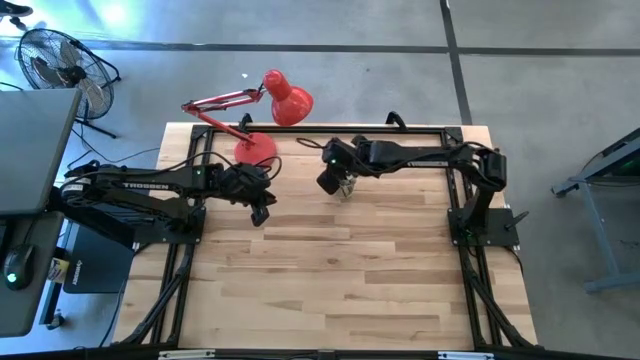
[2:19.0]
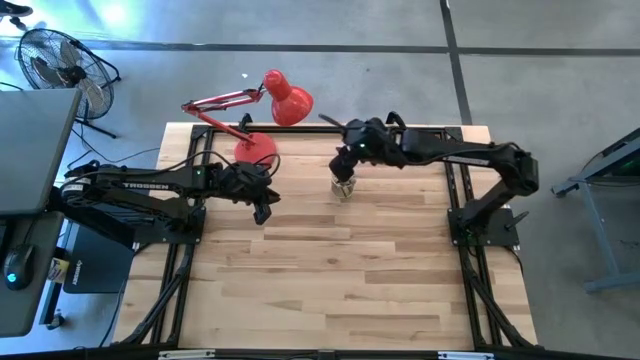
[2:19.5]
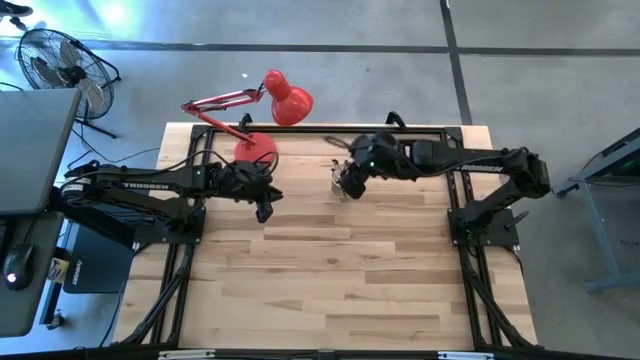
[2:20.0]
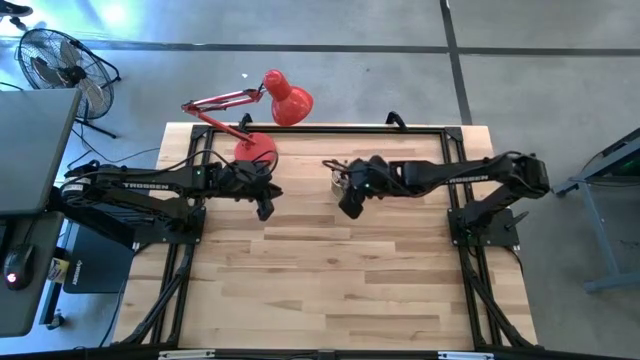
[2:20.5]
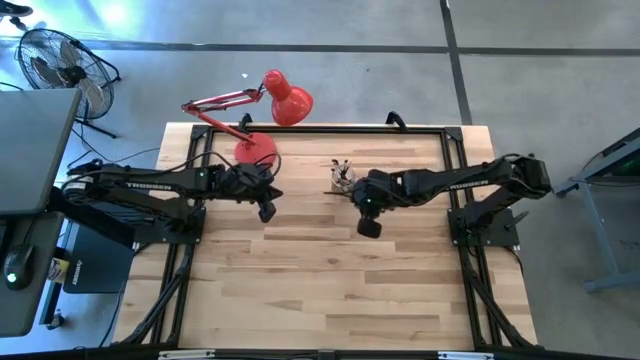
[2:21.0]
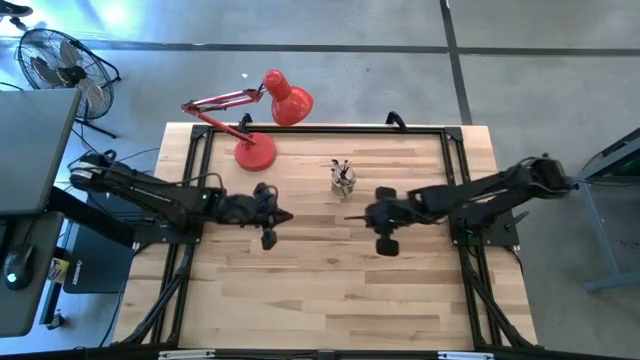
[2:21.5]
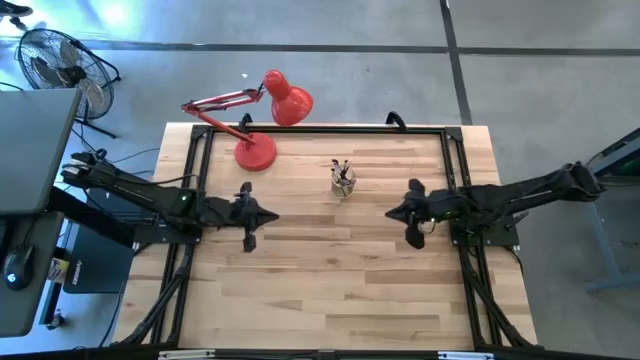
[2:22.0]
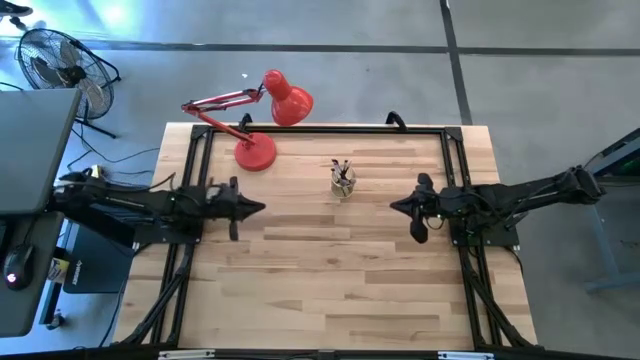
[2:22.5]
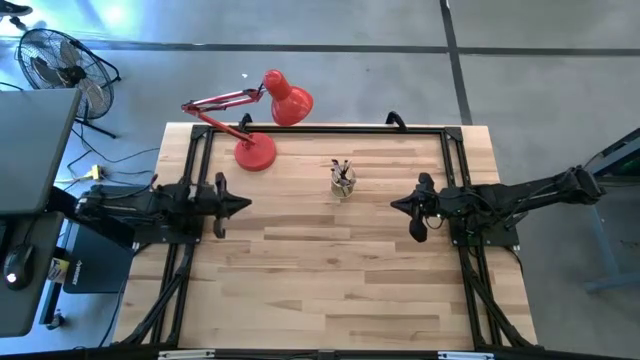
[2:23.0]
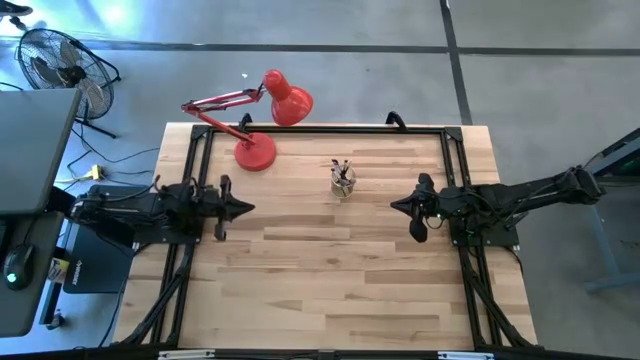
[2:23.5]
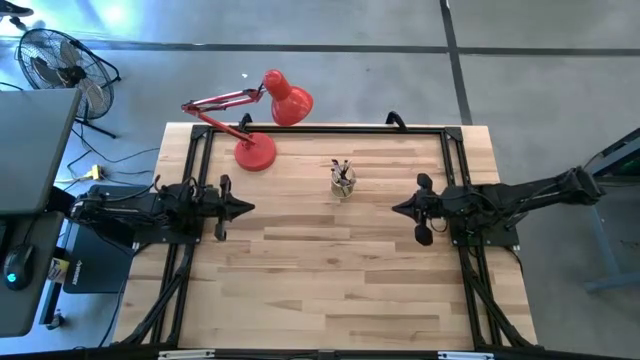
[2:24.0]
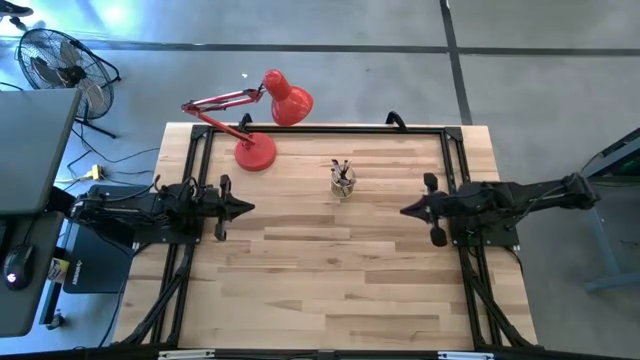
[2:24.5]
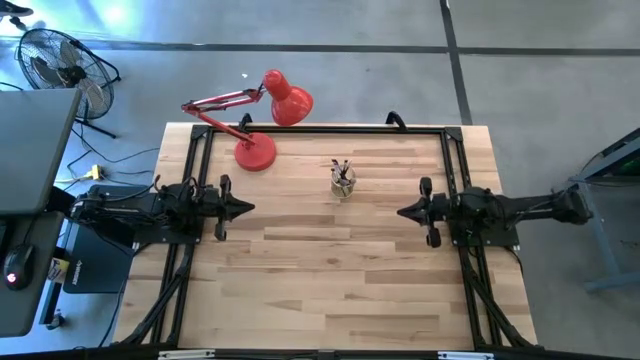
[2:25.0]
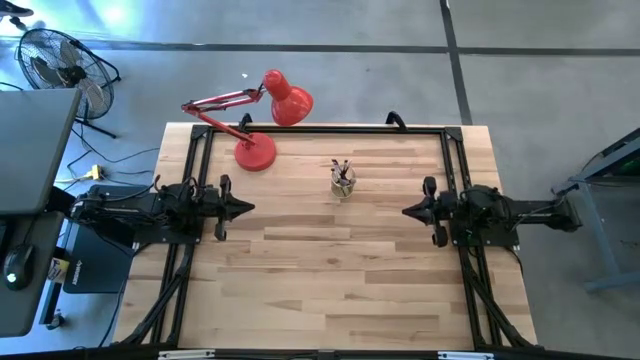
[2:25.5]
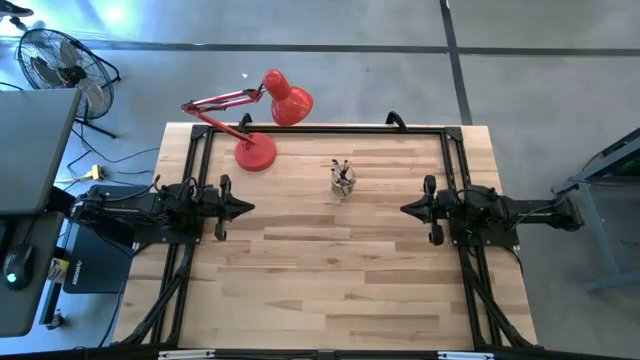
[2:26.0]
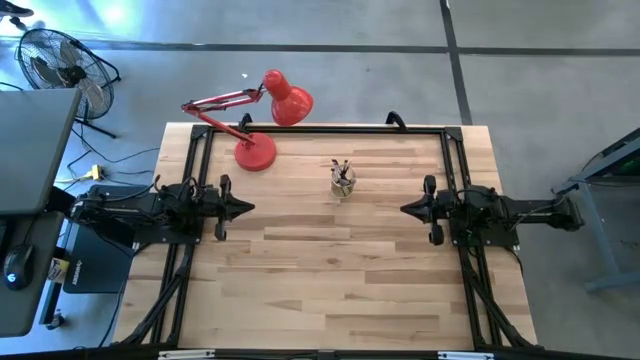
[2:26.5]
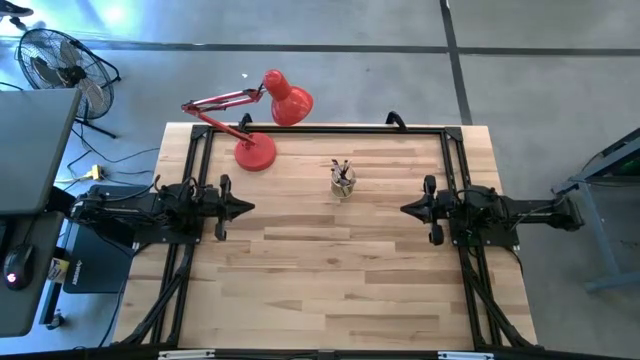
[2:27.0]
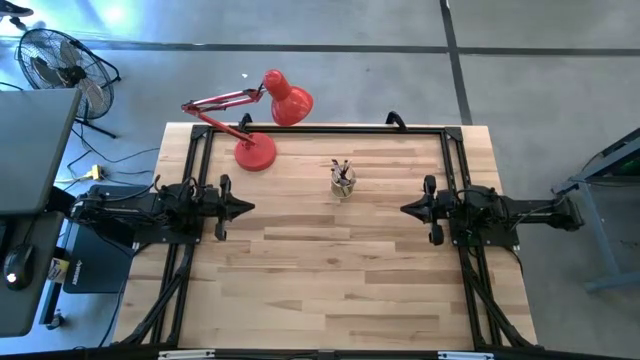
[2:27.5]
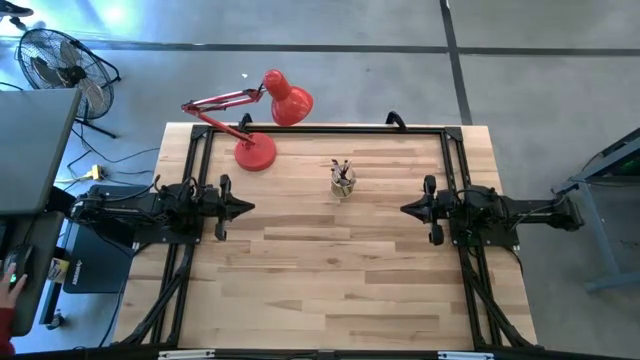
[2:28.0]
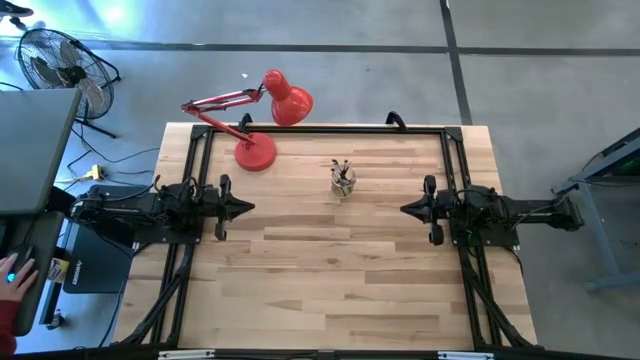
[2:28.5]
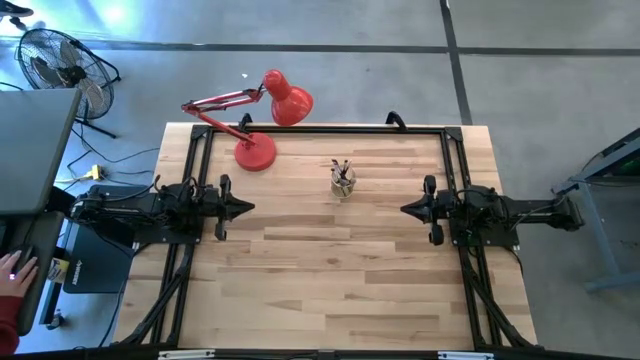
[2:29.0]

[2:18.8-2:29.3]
Task: Put items in baskets/containers
Return to Home Position

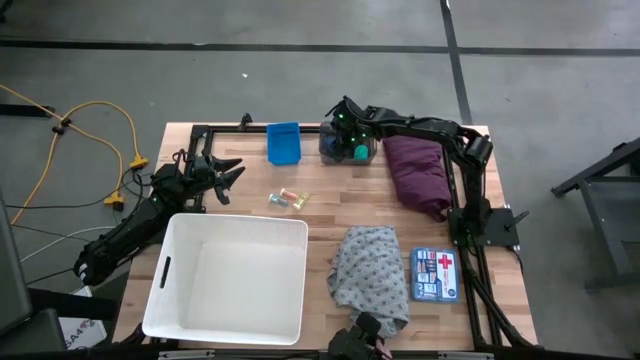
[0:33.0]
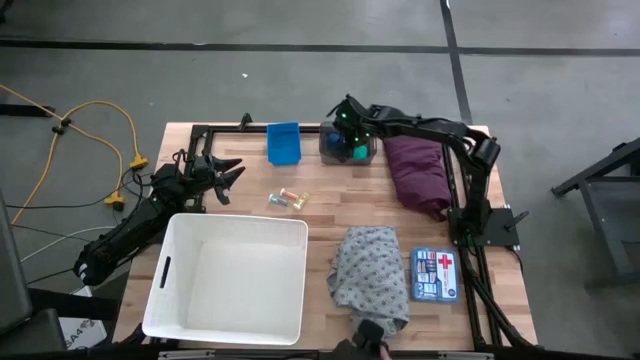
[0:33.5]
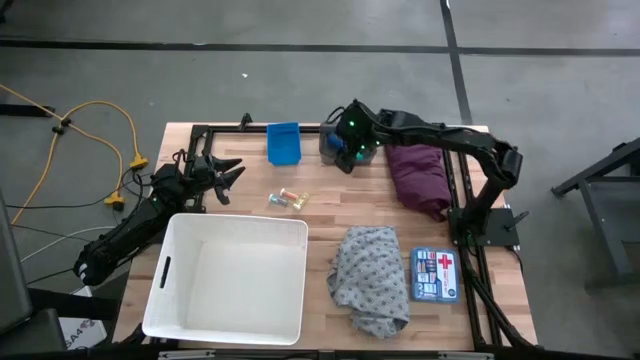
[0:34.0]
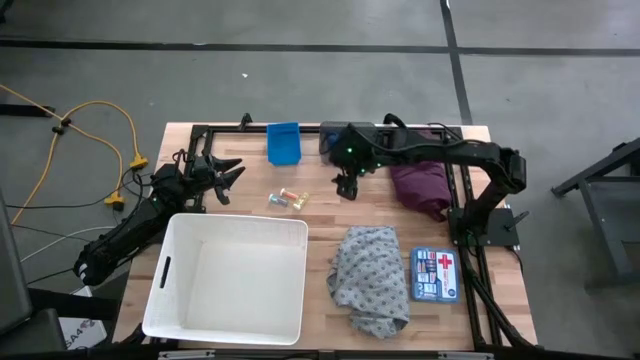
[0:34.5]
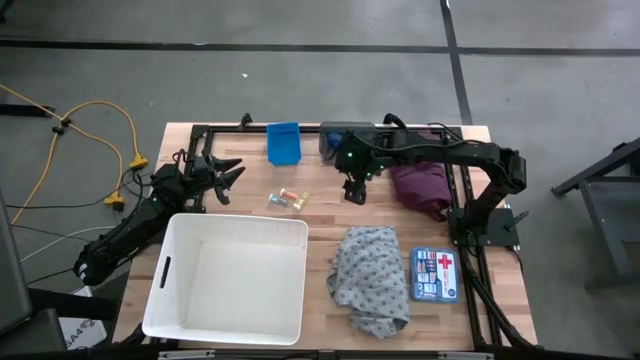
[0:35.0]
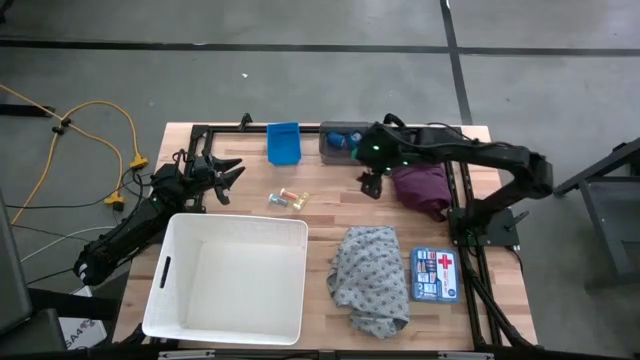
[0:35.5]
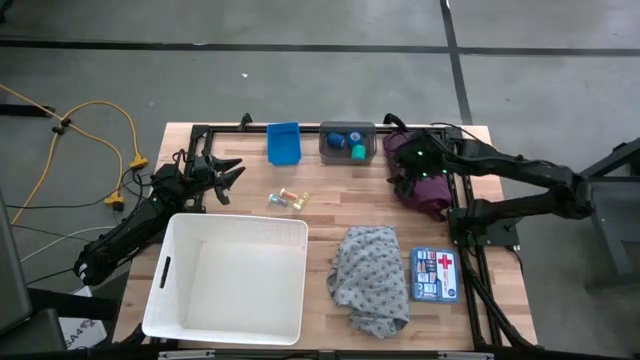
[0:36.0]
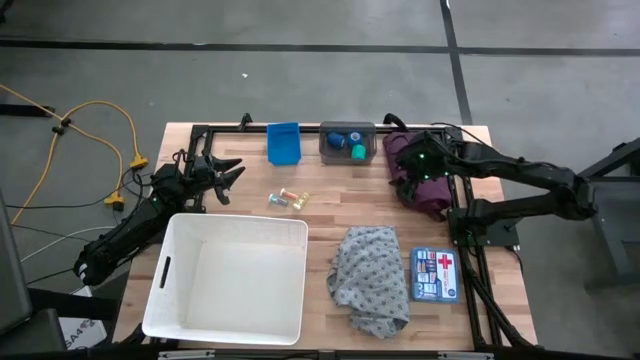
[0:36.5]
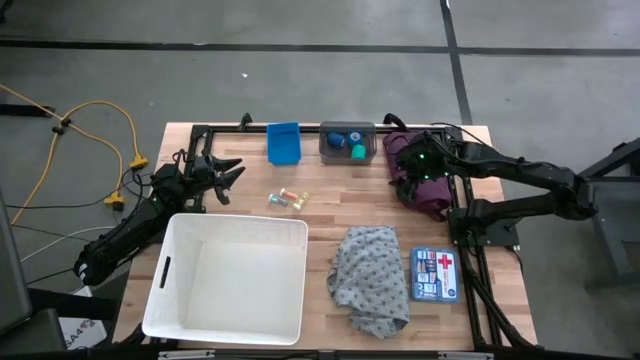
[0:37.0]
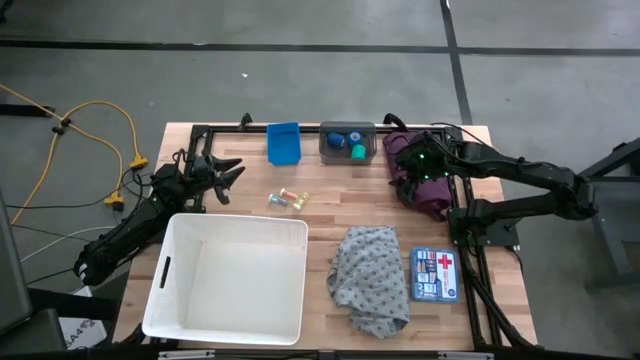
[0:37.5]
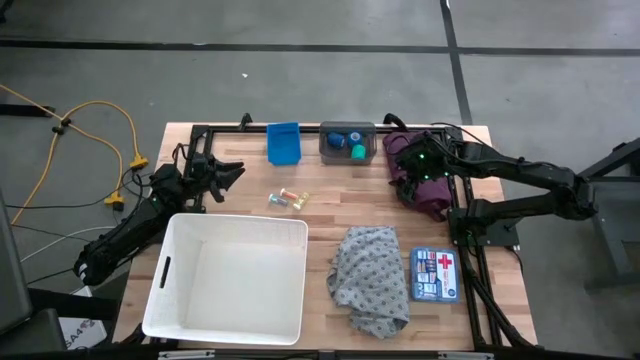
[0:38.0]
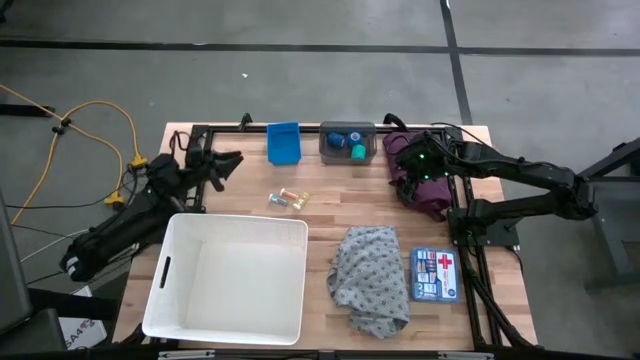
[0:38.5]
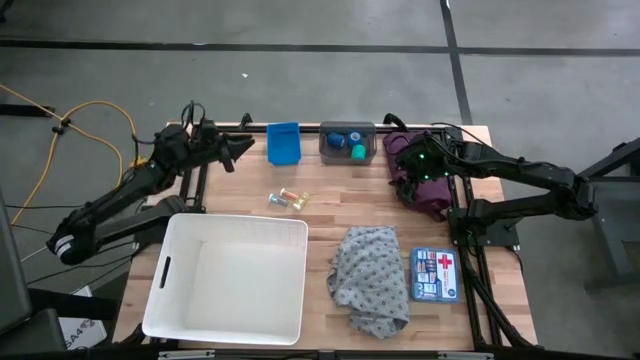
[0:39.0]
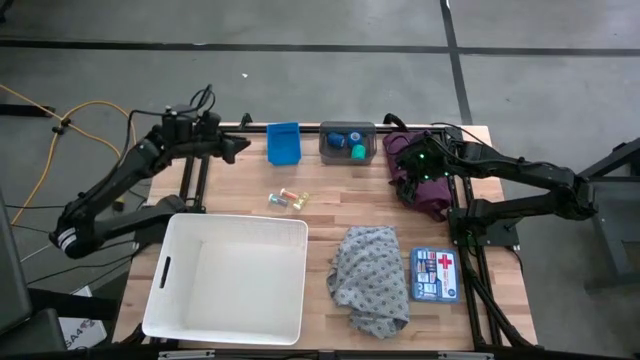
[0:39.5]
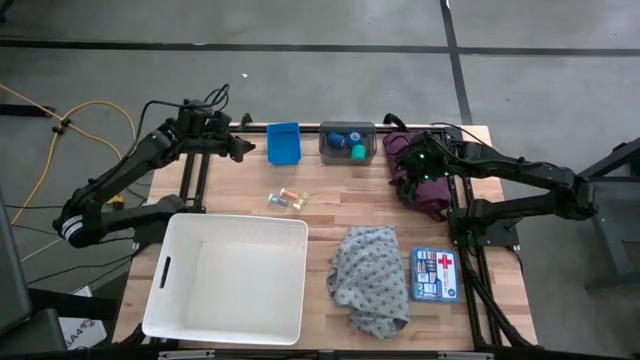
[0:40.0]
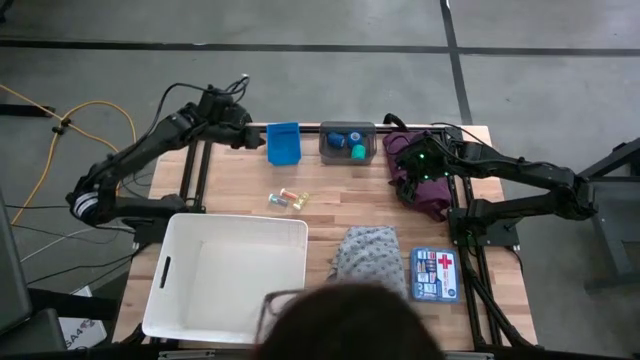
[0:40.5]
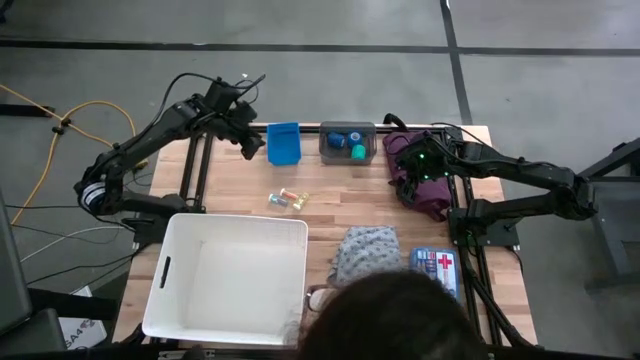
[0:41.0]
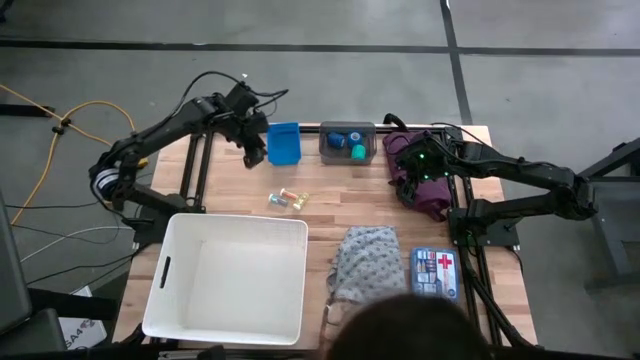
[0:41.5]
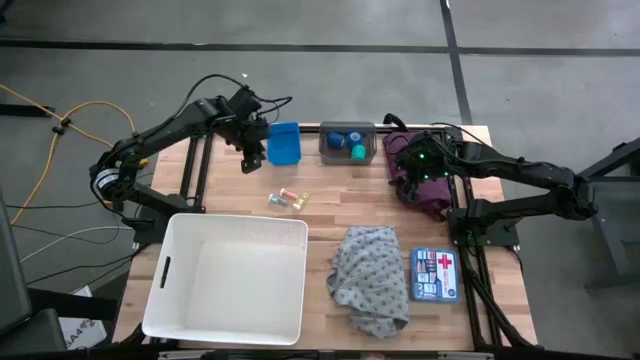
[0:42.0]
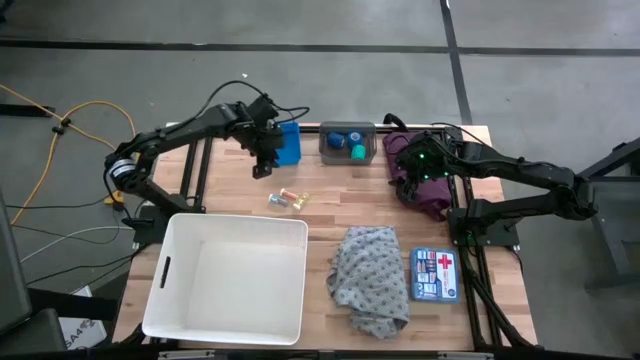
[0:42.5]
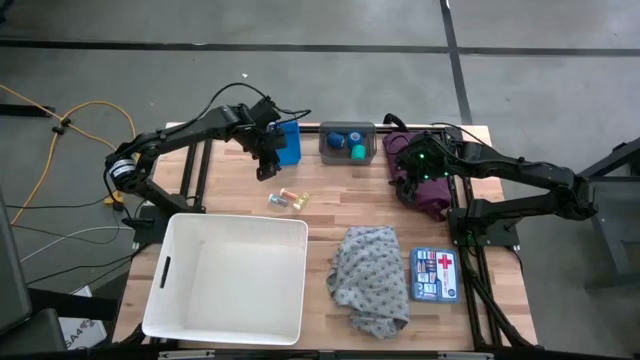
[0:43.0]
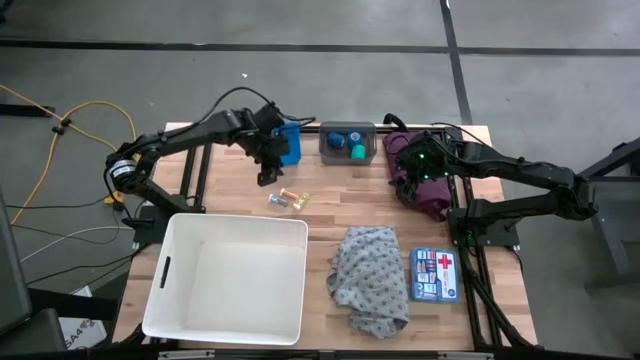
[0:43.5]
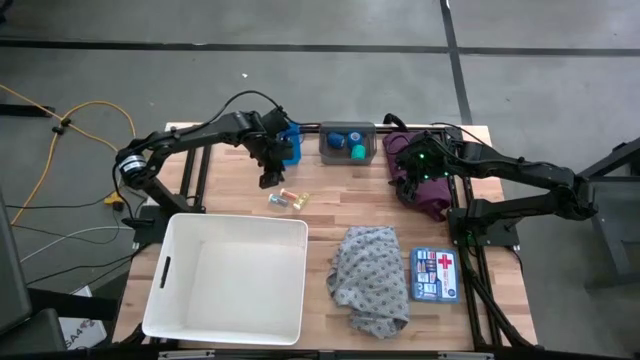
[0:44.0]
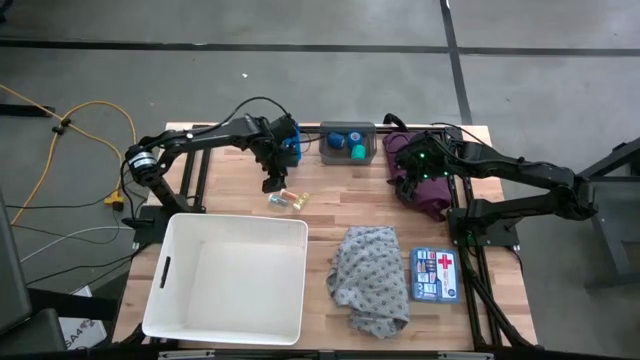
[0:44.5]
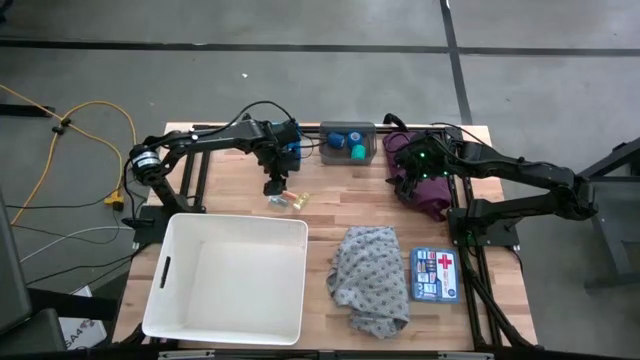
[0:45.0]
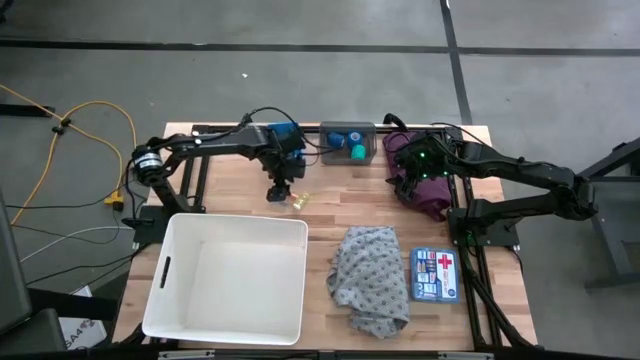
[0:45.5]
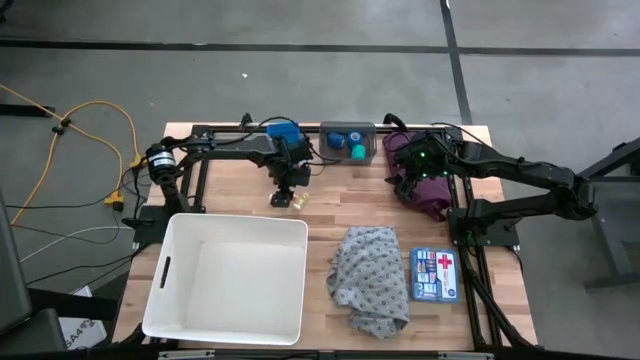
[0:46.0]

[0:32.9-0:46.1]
Task: Pick & place medical supplies in basket/bin
Put the left yellow pill bottle into the blue basket
